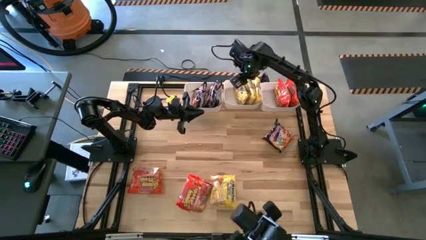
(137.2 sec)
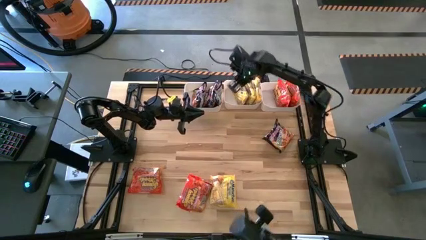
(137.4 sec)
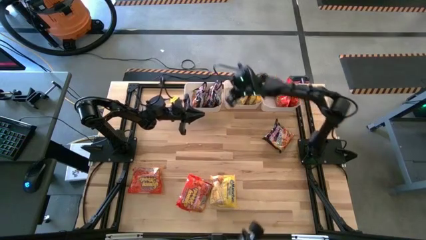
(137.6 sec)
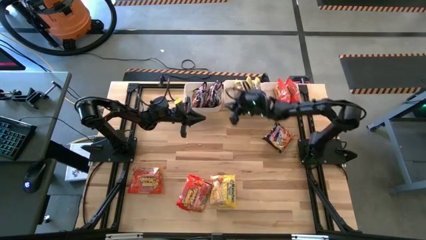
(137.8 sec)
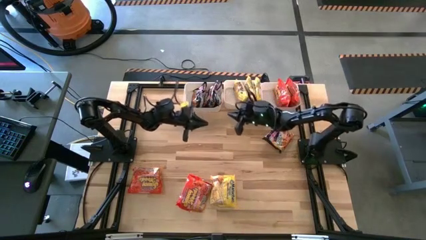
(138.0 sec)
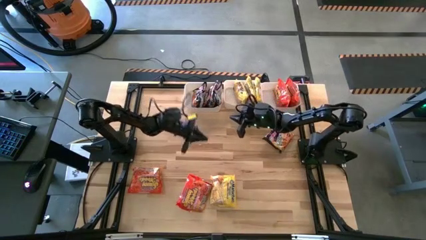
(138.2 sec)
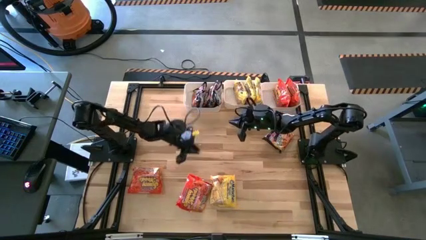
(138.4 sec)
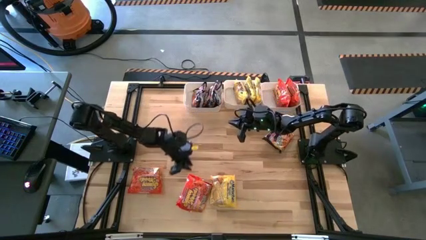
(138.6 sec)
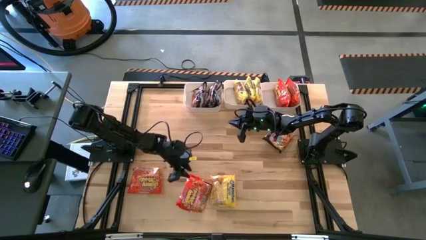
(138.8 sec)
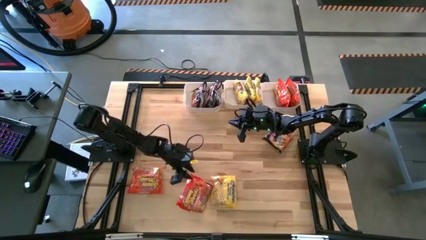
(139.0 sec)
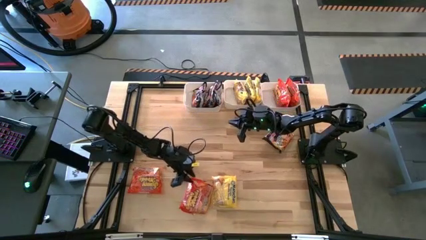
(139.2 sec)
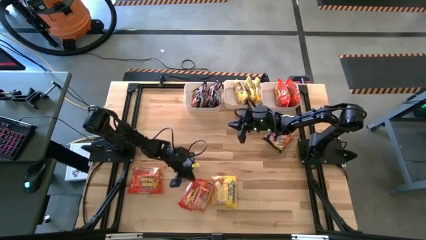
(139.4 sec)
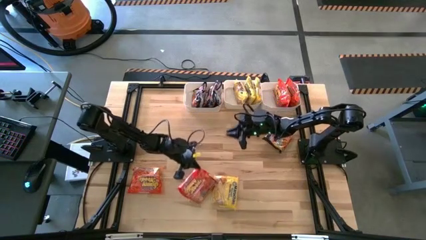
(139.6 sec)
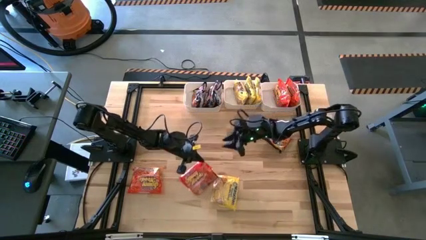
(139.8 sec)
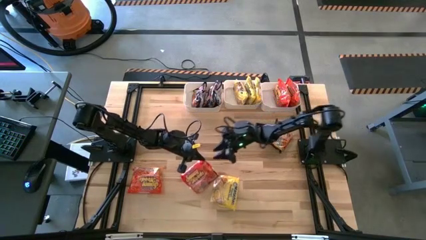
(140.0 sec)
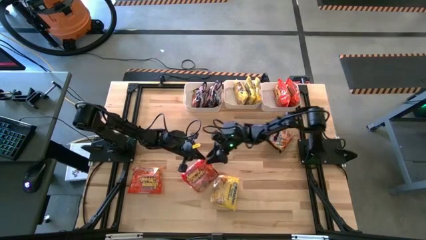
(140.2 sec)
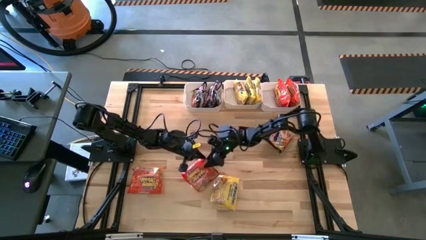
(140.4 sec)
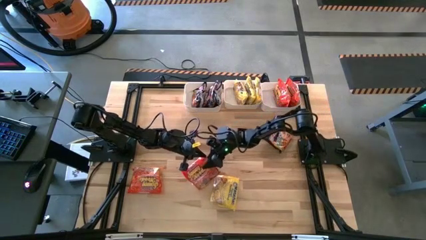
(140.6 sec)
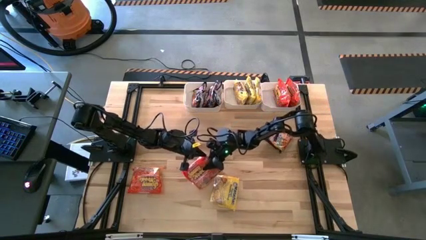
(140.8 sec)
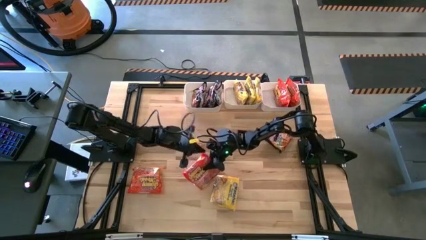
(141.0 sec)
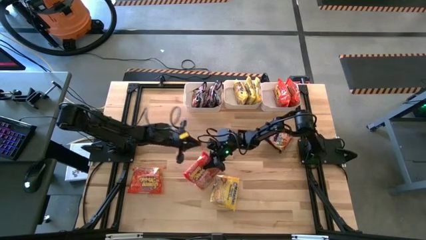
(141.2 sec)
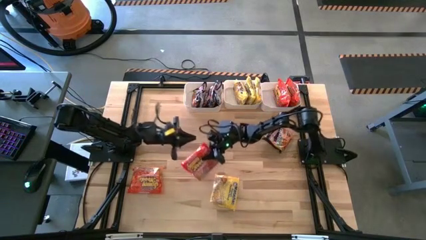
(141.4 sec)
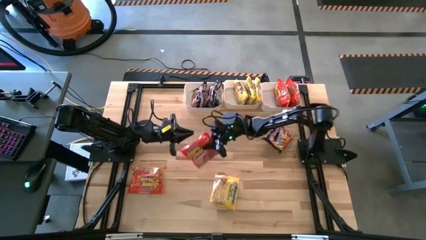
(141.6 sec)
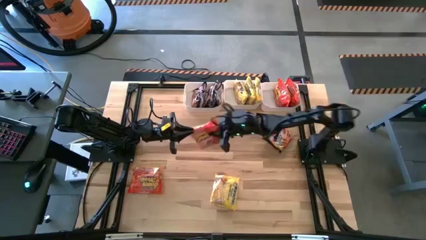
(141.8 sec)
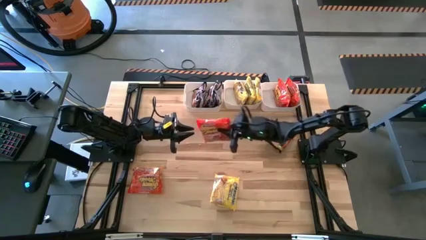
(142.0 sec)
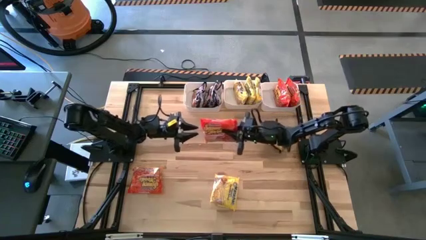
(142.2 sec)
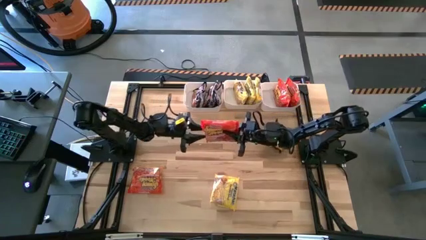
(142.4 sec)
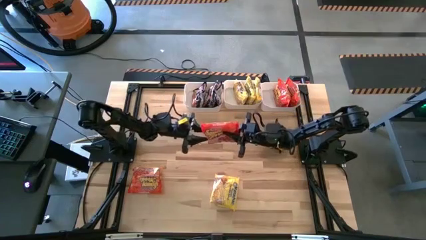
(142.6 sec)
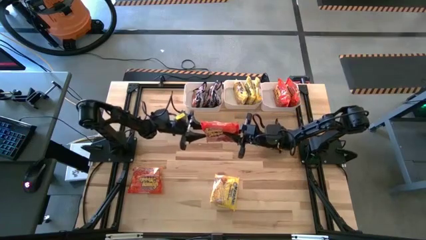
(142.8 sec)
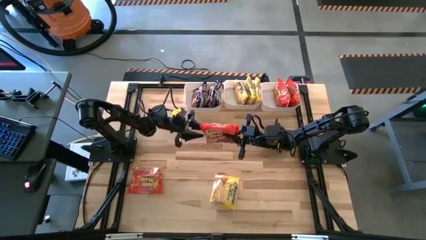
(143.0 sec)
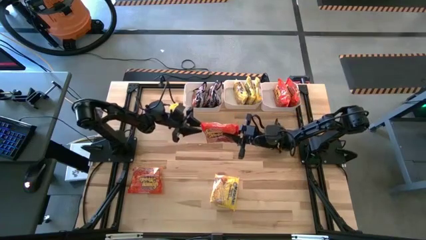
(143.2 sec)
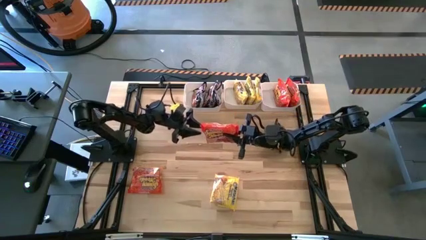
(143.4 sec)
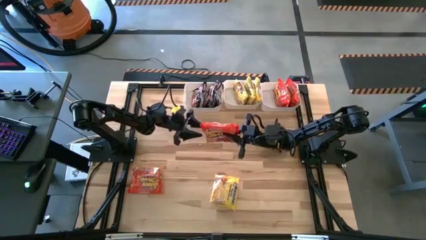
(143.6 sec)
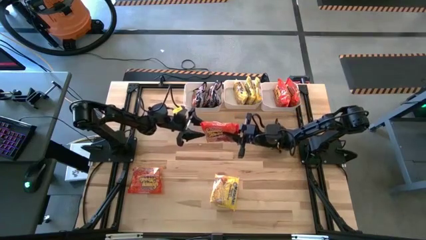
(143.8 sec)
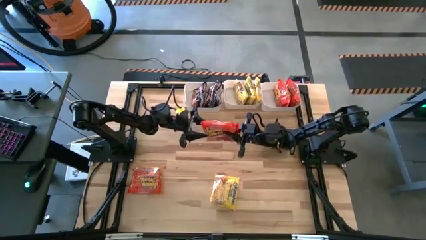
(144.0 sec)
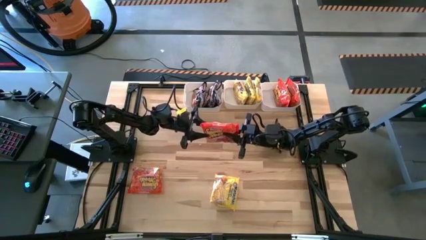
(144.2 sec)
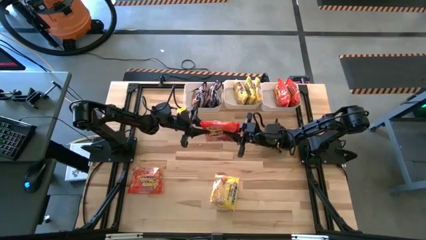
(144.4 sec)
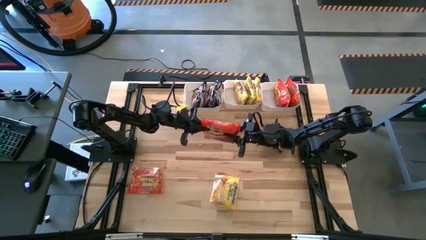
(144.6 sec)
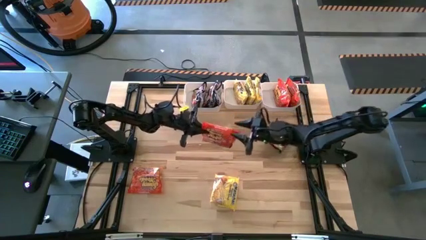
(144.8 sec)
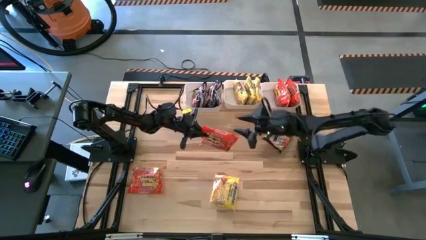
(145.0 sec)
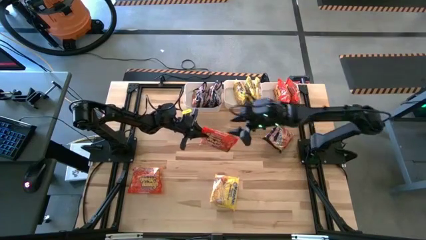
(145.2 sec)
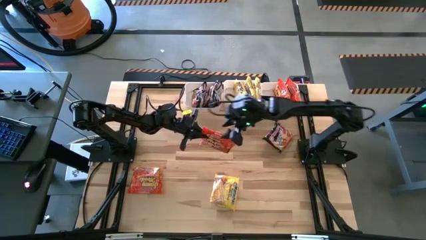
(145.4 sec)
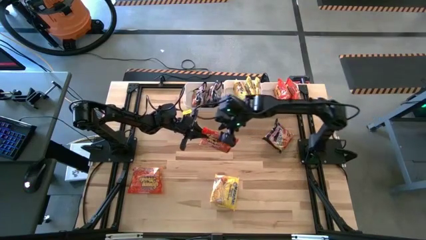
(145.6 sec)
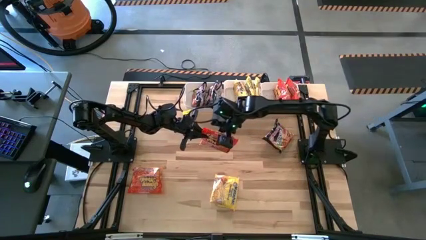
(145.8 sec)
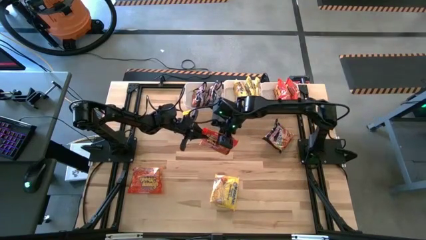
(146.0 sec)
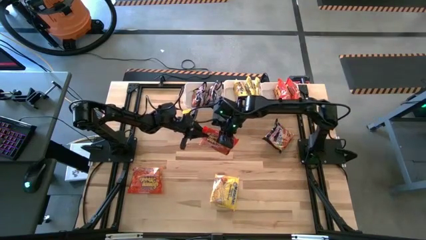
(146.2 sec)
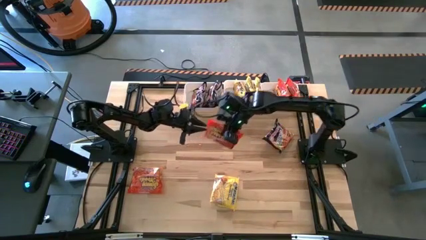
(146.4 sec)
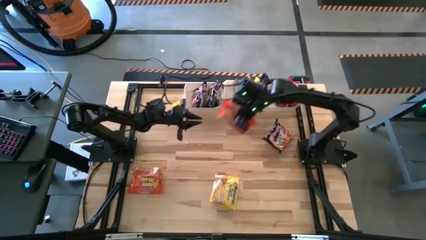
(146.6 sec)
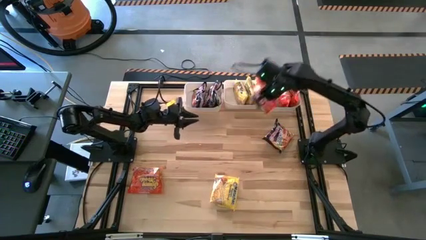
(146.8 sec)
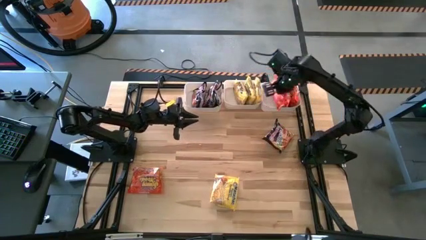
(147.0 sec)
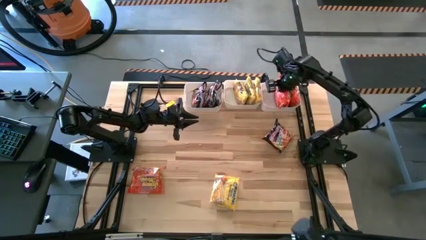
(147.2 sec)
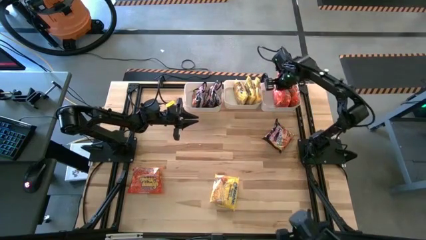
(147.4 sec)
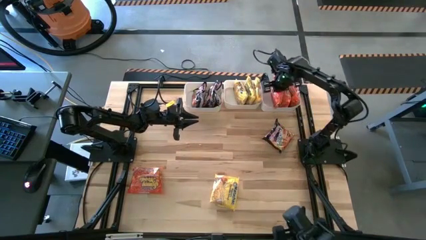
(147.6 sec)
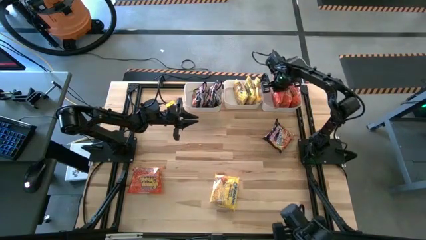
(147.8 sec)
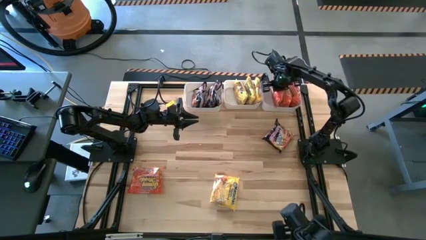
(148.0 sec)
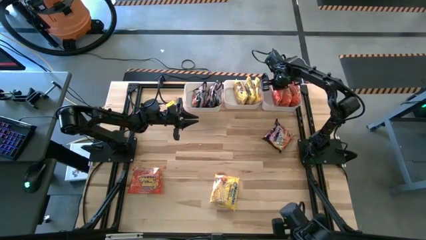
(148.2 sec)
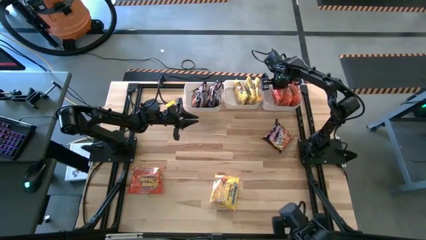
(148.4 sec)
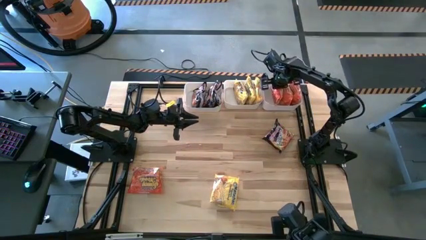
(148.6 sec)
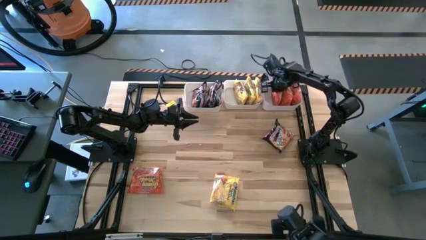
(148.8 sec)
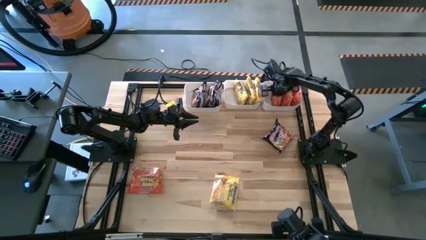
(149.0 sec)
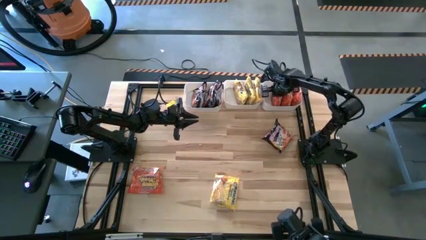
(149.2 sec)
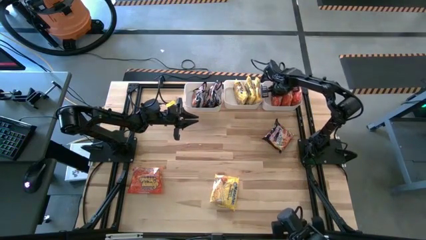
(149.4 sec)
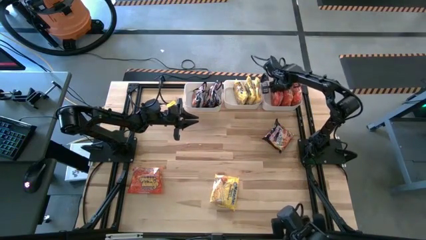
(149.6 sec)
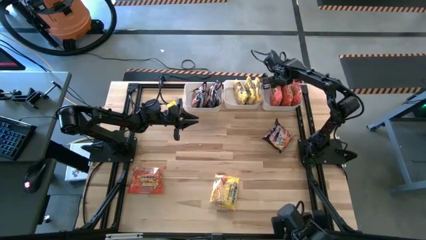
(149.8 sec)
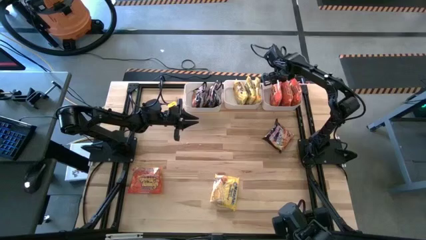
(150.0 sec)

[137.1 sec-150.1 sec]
Task: Sort Maruchan noodles
Put the orange noodle into the right white bin

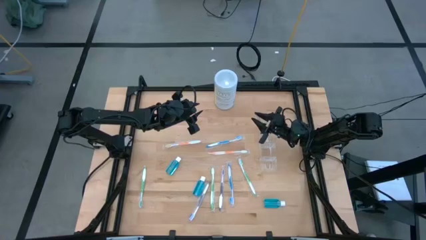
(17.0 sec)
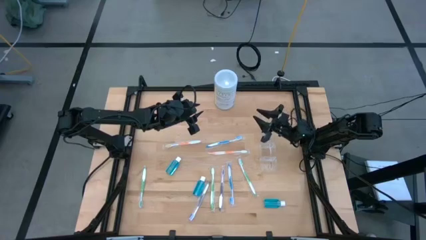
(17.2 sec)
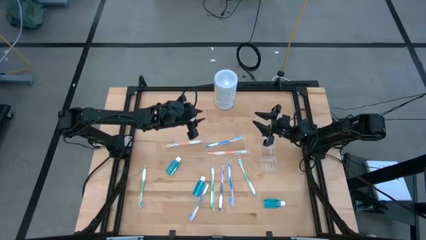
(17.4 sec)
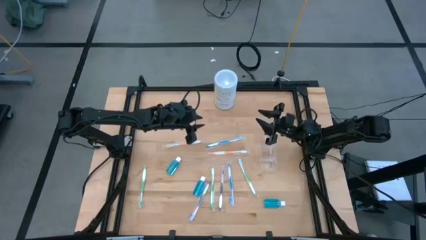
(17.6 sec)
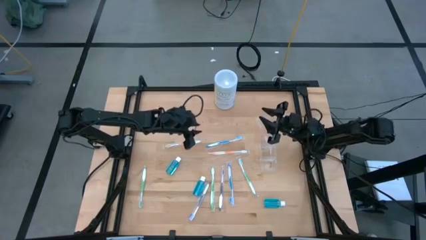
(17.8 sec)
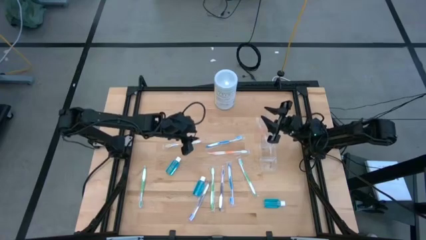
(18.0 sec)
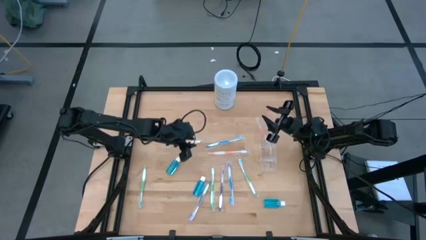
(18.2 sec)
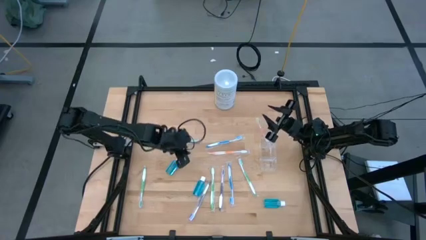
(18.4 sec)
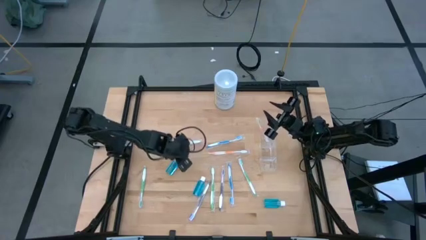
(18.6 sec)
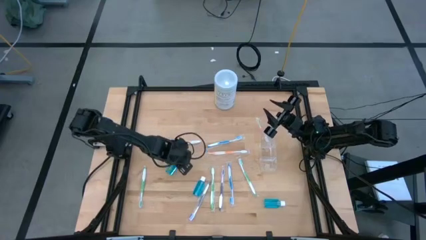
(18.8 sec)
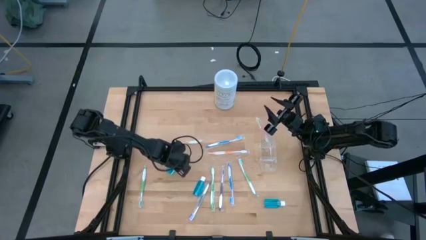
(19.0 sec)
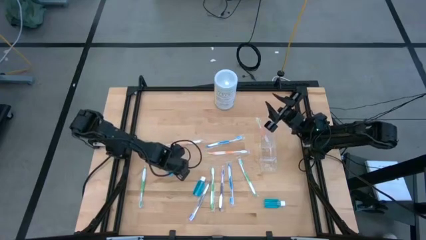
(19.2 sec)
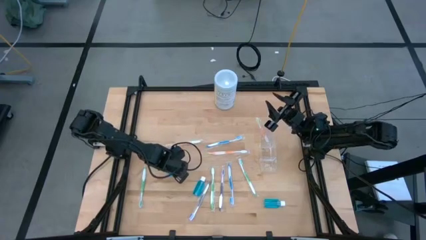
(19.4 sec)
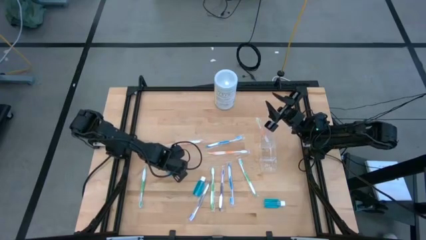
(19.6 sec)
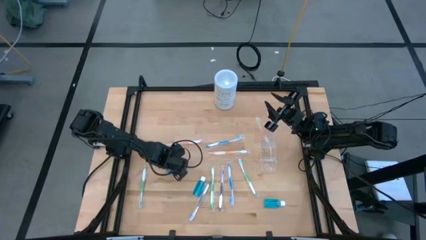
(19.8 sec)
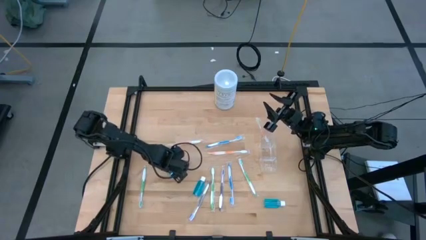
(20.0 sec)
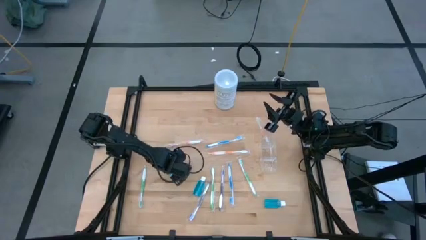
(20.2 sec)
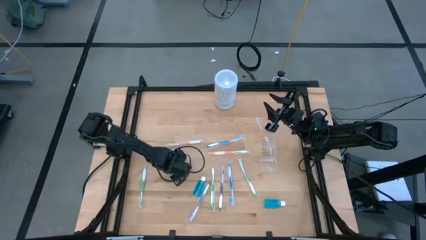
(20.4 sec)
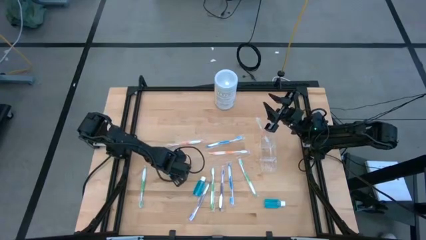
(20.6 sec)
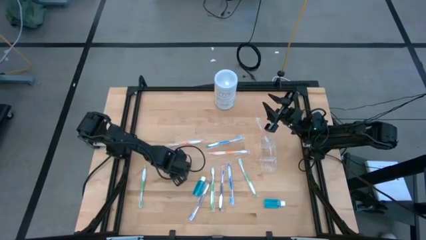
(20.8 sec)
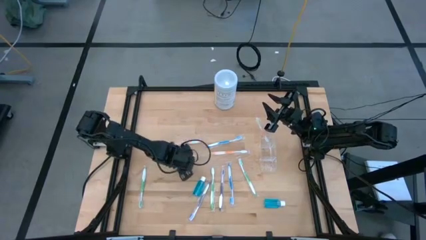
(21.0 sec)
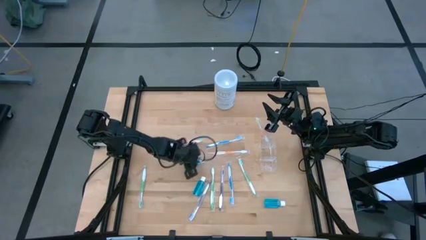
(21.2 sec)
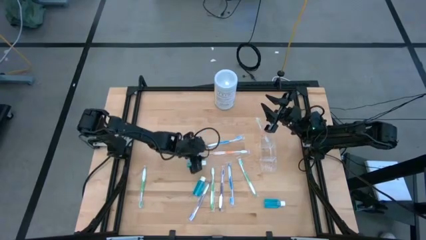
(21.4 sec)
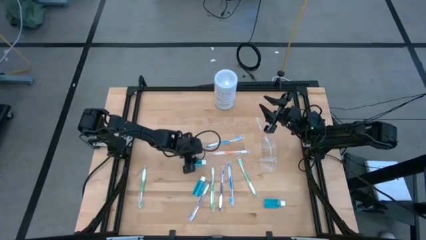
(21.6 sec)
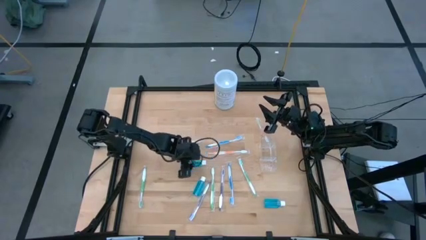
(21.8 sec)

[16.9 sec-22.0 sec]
Task: Pick & Place toothbrushing station
Put the left mouthwash into the transparent organizer
